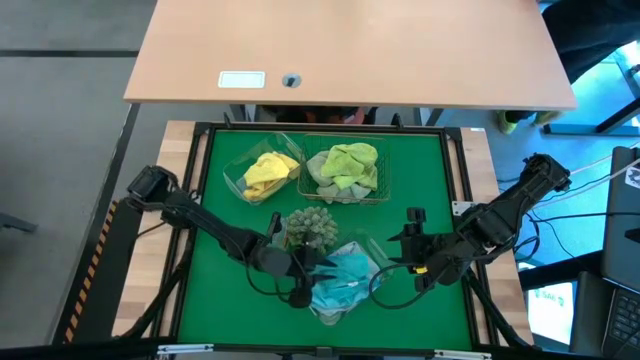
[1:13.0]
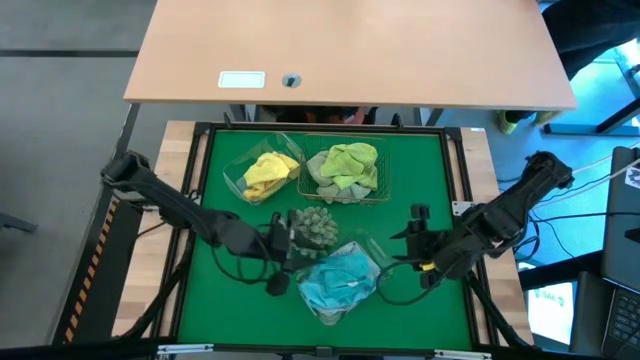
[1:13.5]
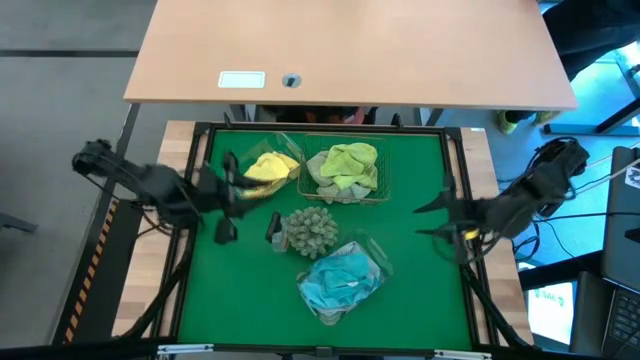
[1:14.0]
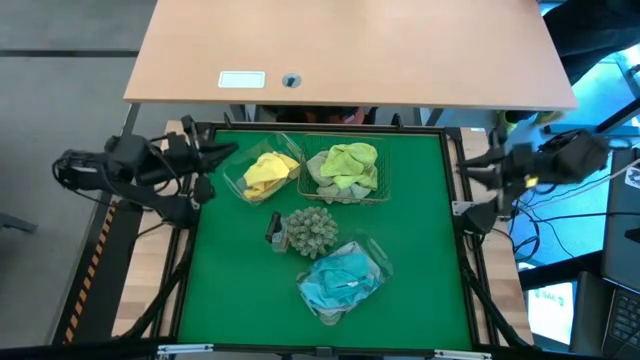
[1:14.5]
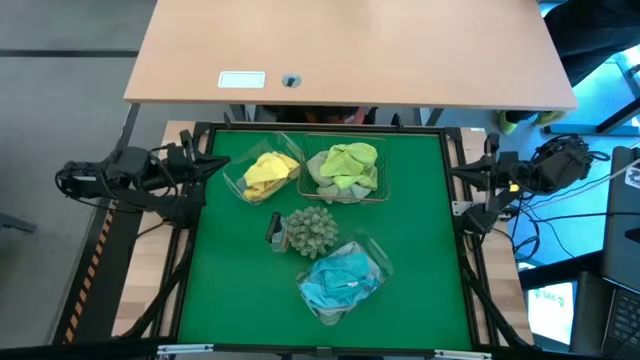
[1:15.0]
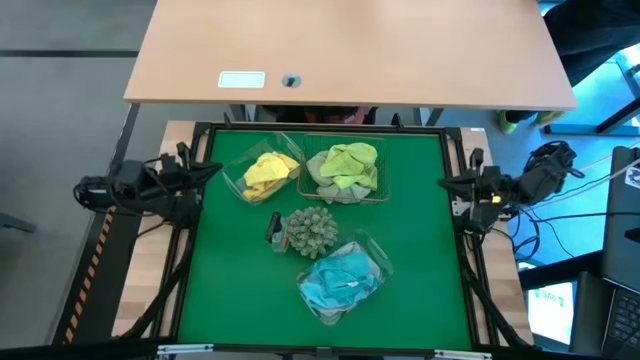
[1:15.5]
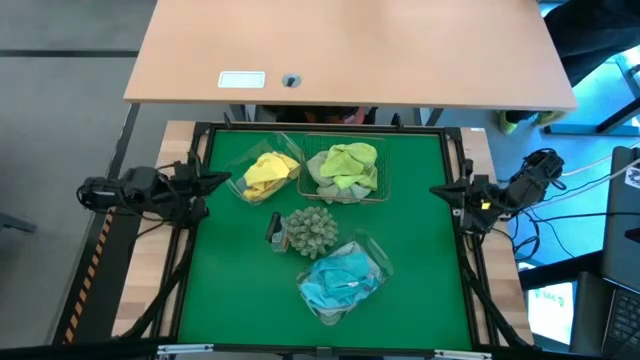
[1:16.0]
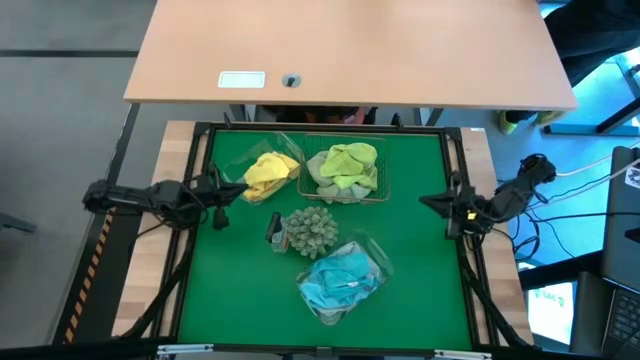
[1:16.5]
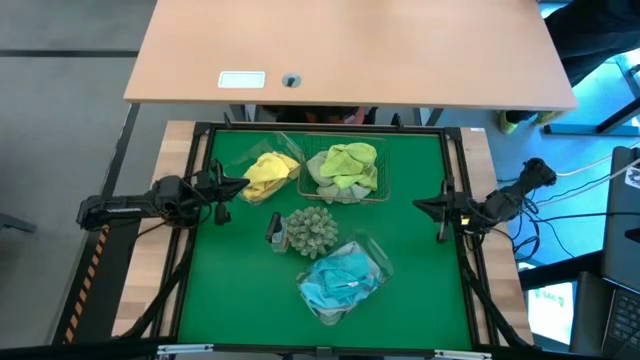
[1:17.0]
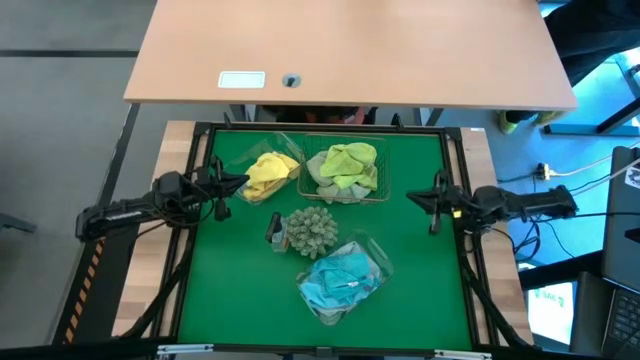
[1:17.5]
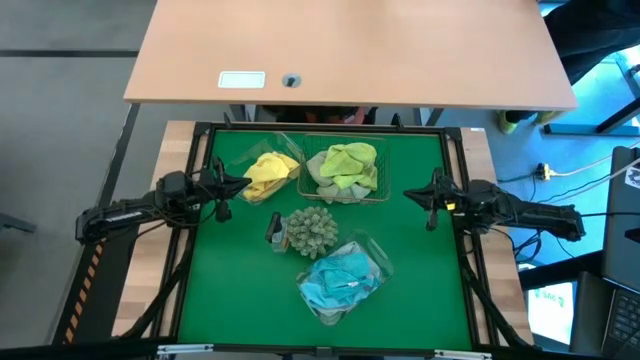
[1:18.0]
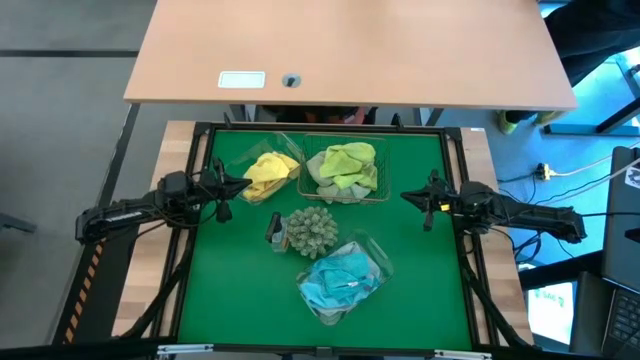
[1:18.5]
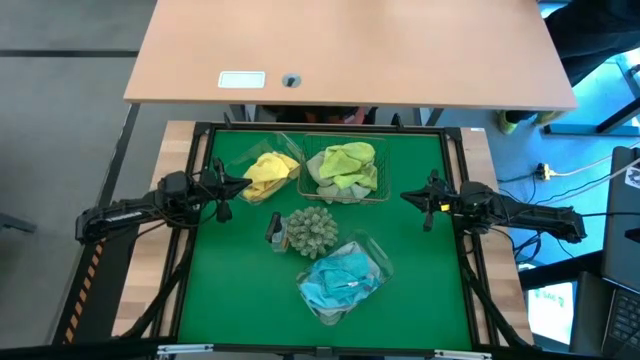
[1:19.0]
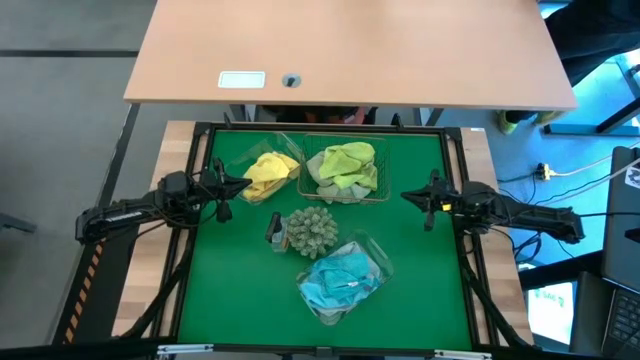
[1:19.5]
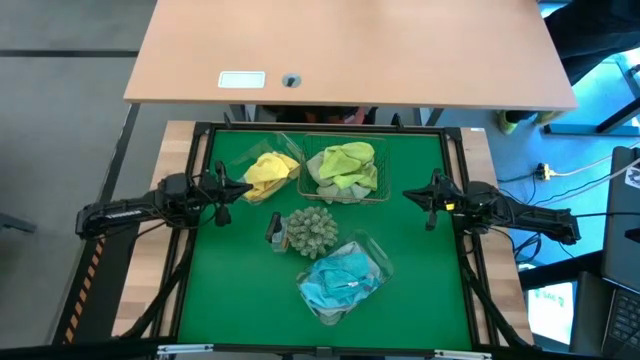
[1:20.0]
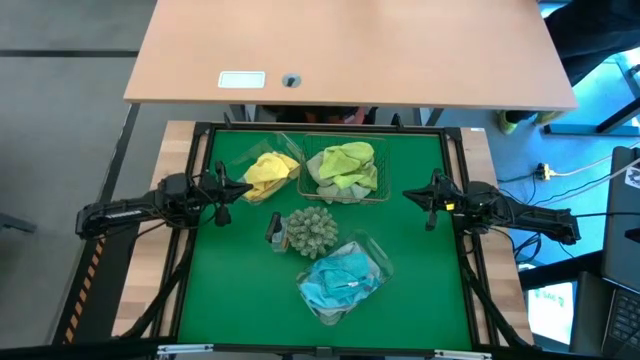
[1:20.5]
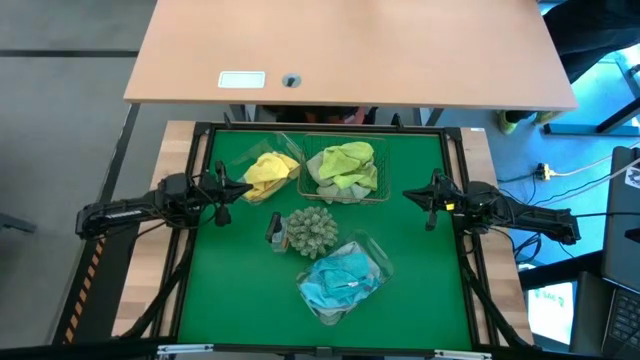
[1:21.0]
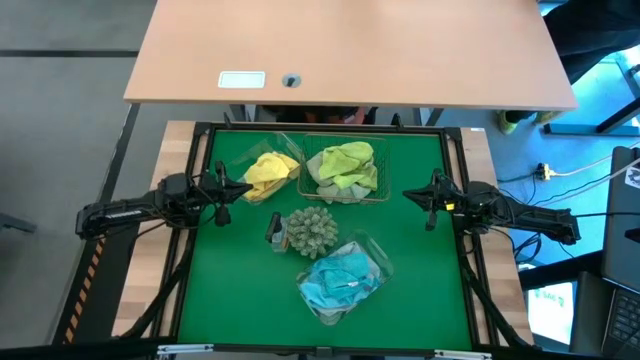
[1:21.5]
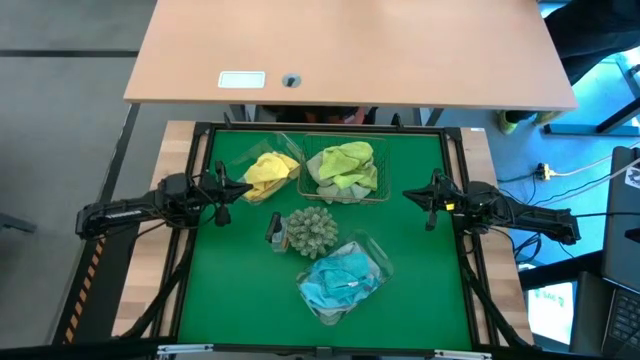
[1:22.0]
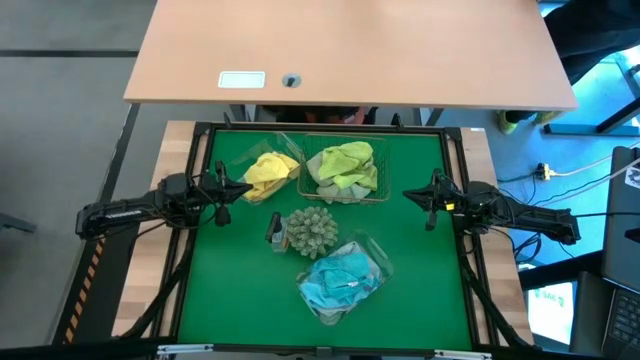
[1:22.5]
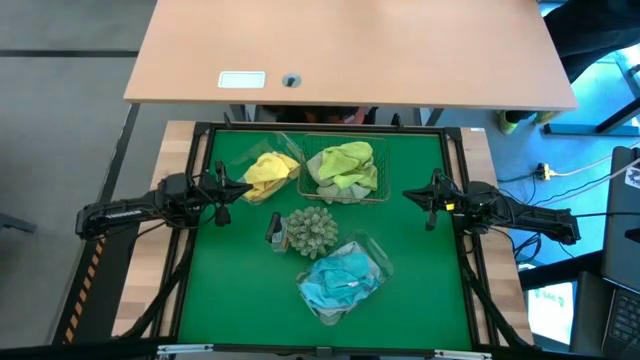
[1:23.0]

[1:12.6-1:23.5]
Task: Sort microfiber towel by color & place in baskets
Return to Home Position

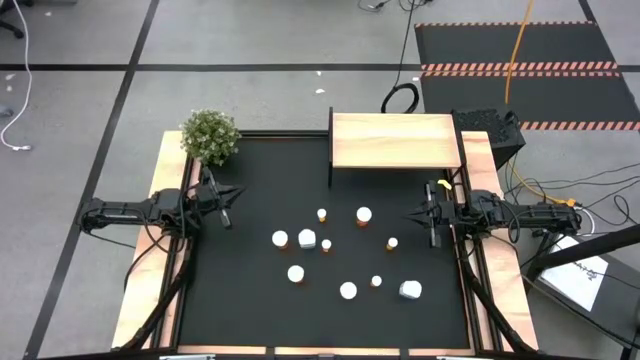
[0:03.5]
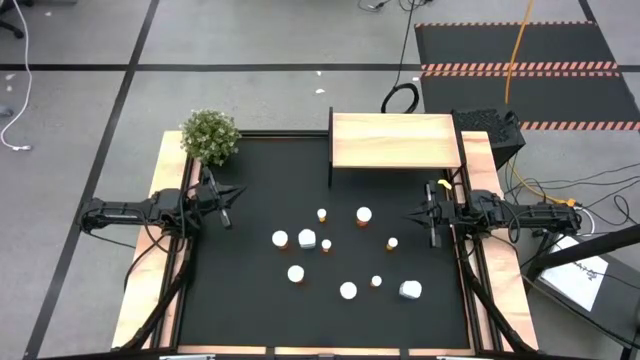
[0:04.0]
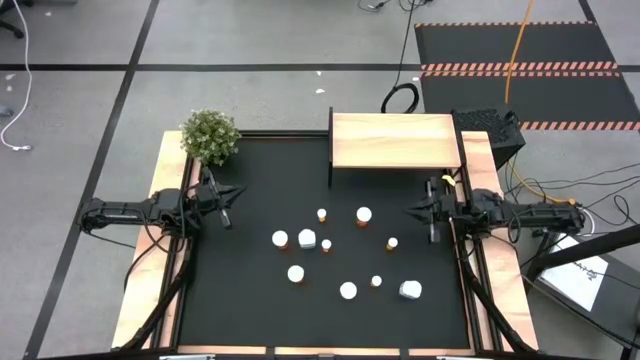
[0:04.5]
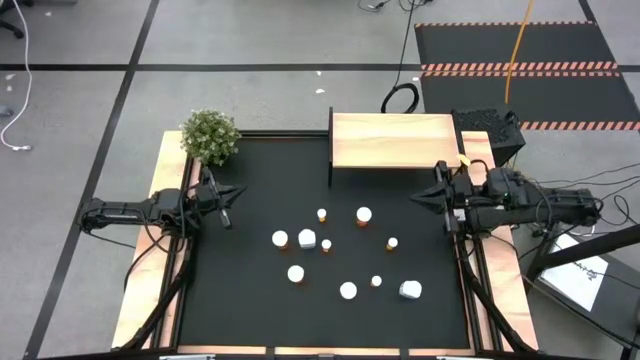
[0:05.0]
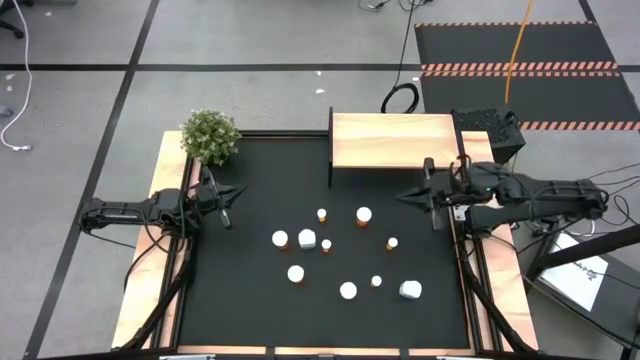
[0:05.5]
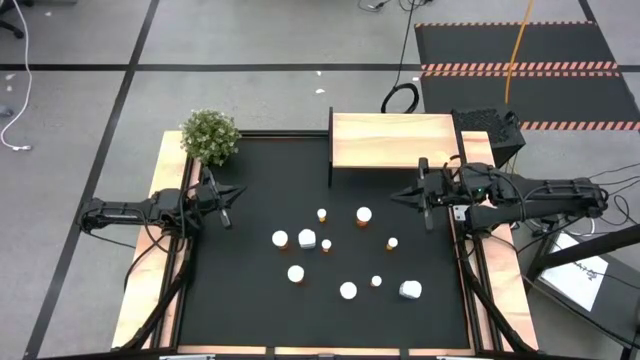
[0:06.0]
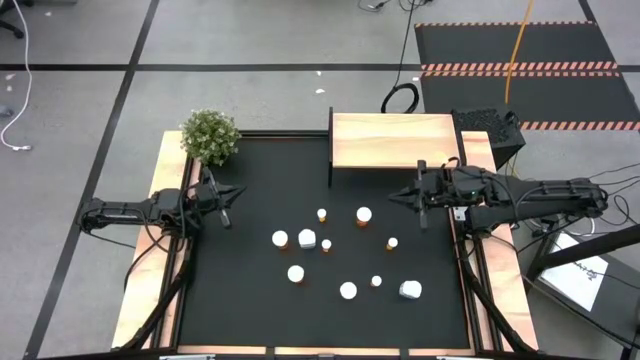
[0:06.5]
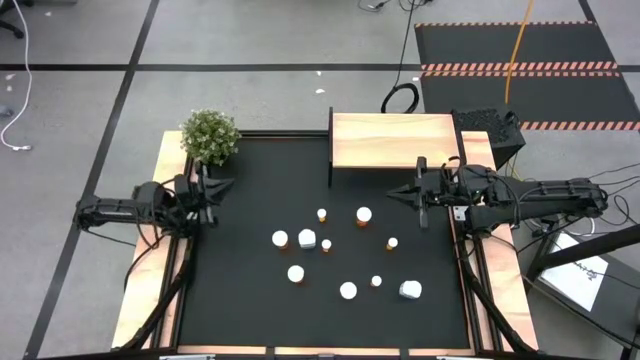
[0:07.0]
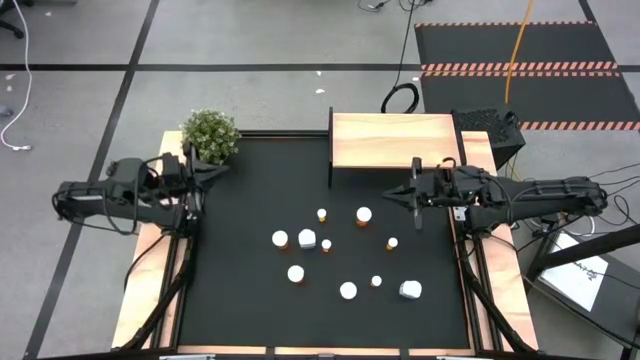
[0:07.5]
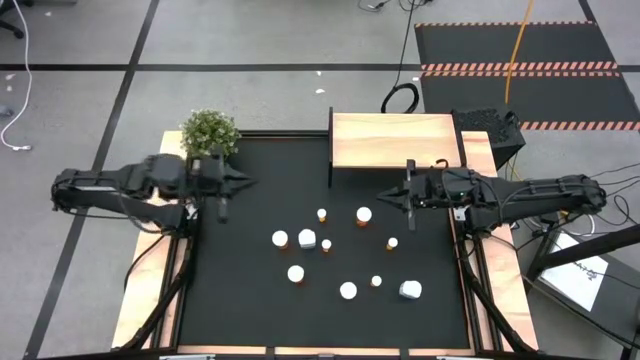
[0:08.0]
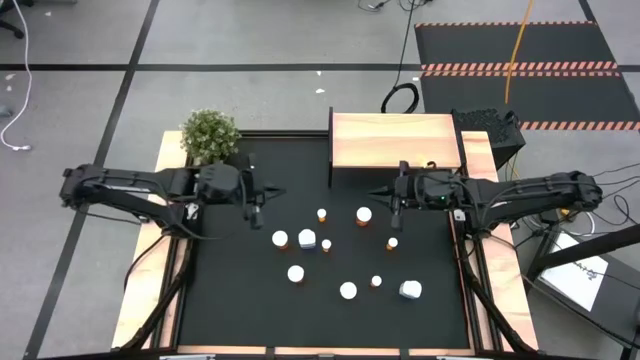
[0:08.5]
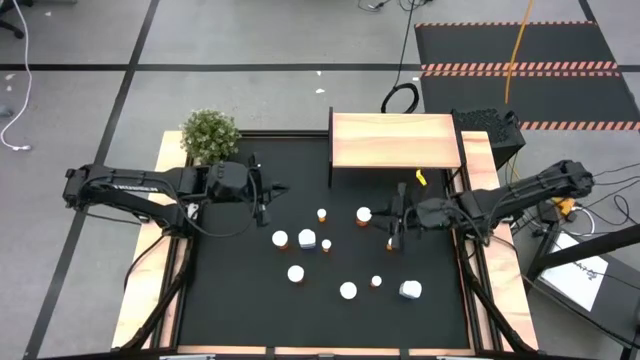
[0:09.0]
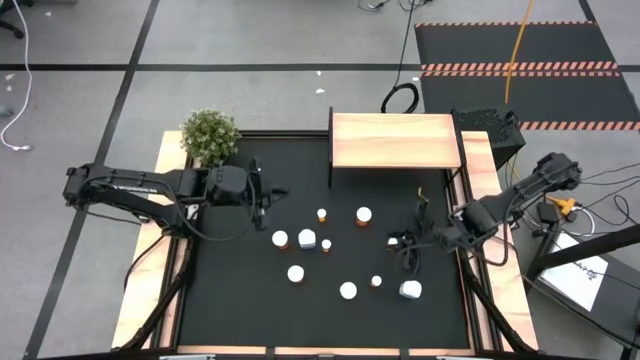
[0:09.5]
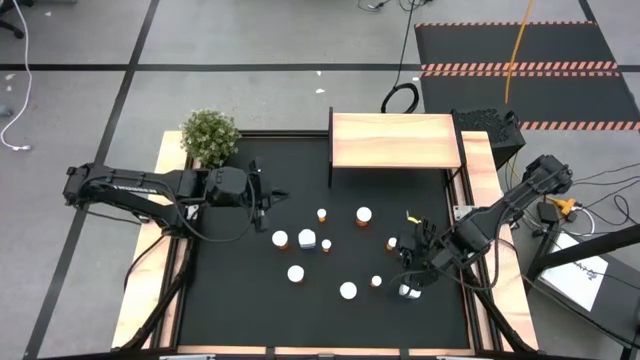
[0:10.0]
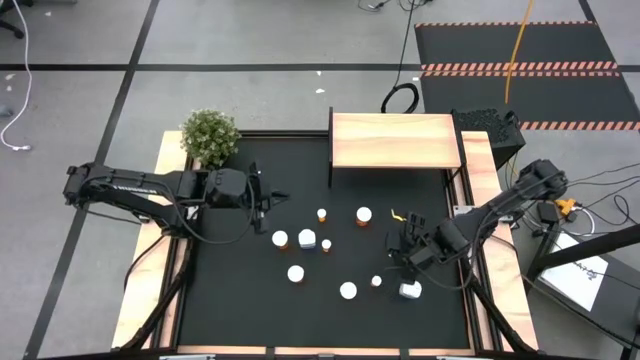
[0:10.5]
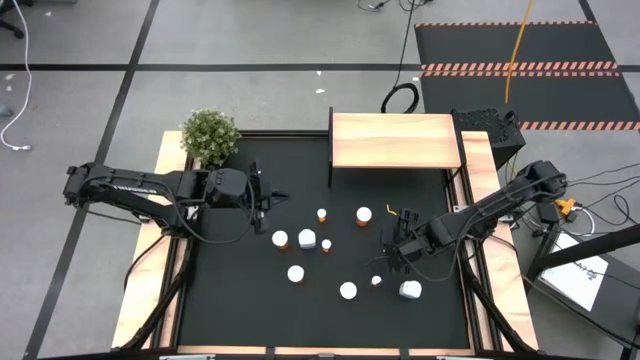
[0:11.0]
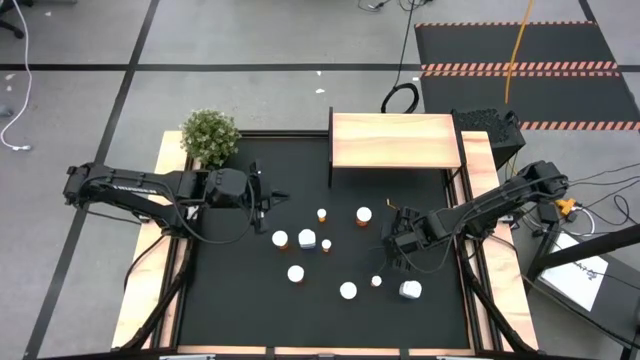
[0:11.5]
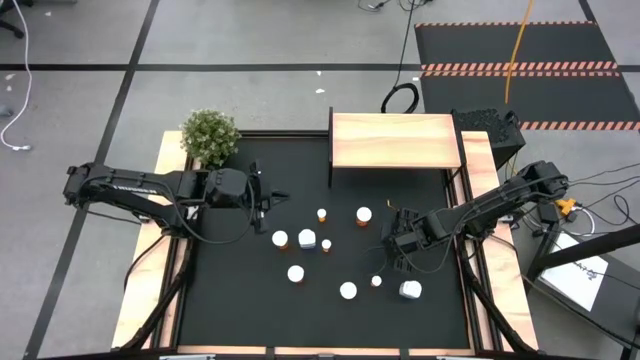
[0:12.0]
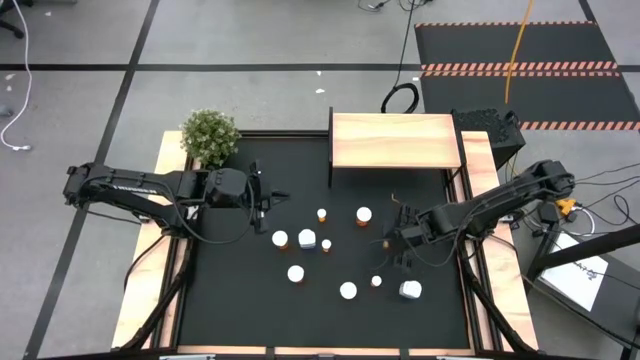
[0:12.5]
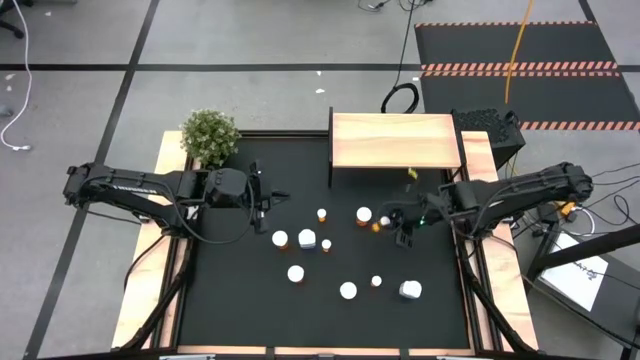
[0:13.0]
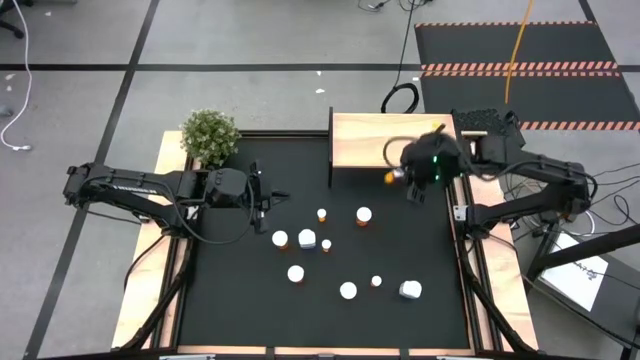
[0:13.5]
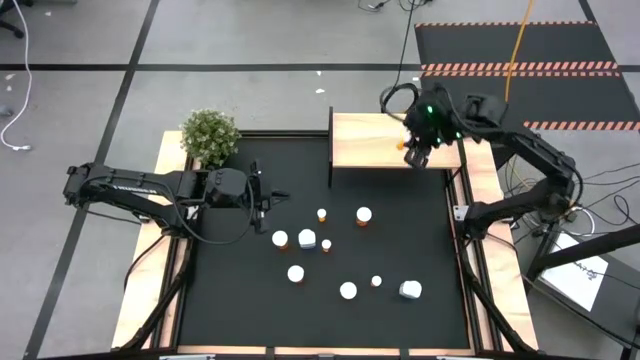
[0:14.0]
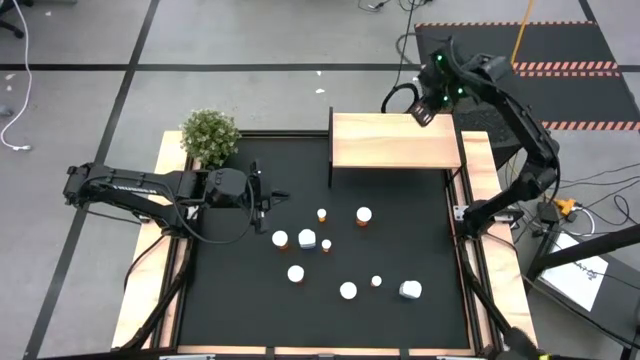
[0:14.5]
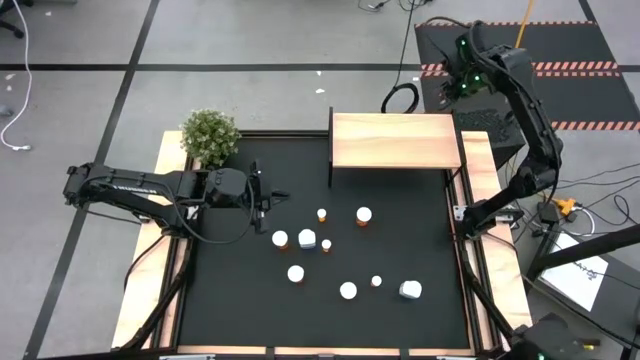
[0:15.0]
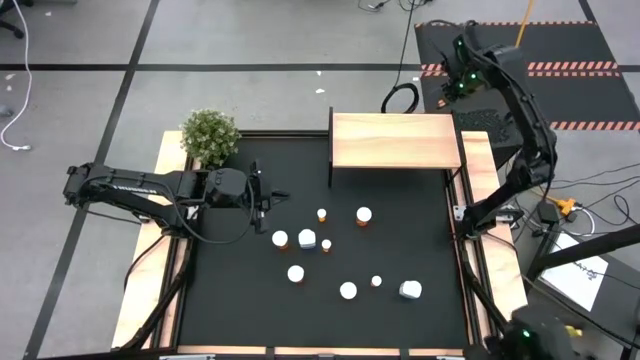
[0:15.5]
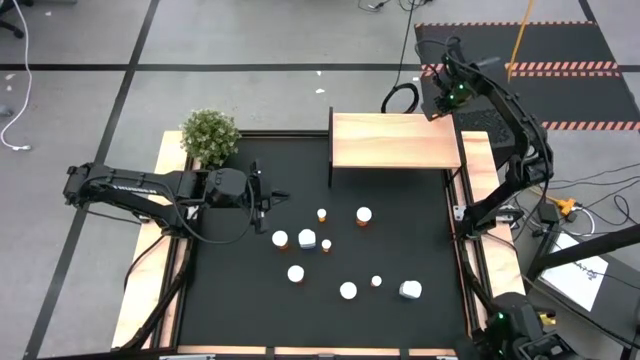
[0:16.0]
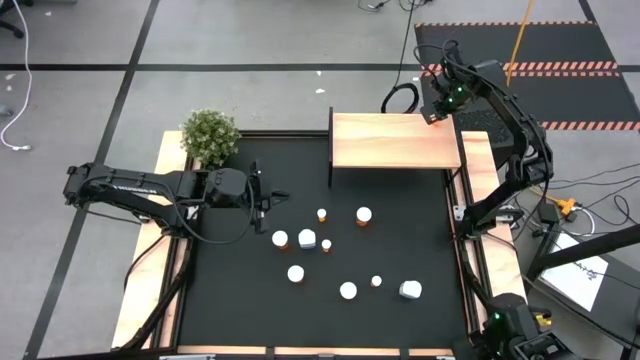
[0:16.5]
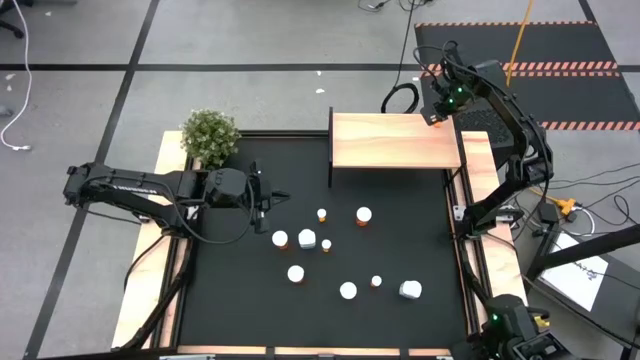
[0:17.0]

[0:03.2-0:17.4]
Task: Pick and place medicine bottles onto shelf by color
Put the small orange pill bottle on the shelf
